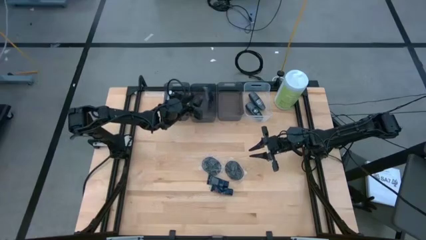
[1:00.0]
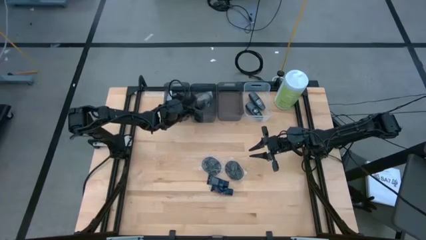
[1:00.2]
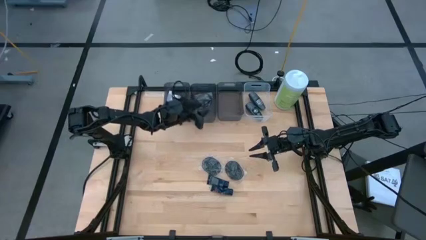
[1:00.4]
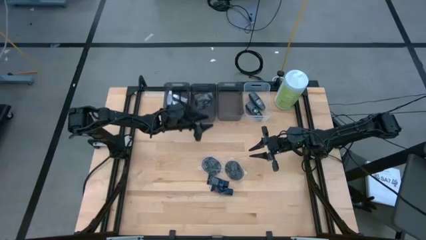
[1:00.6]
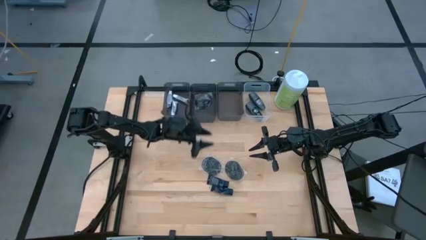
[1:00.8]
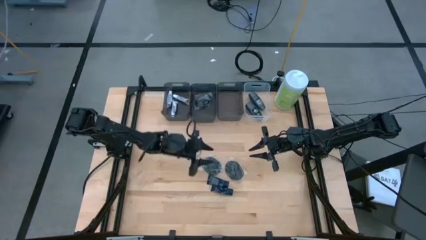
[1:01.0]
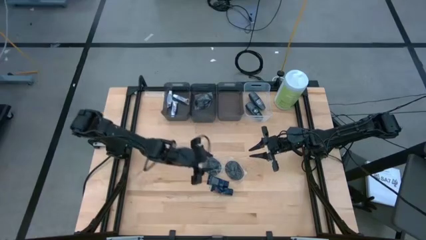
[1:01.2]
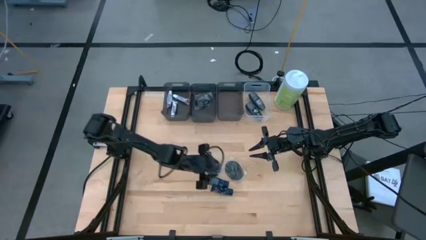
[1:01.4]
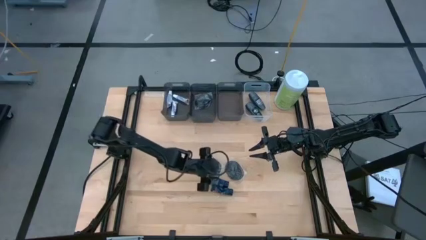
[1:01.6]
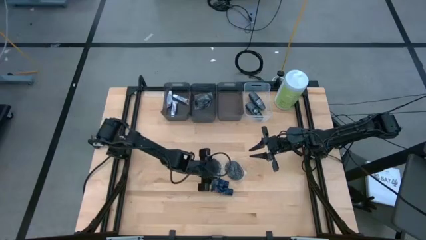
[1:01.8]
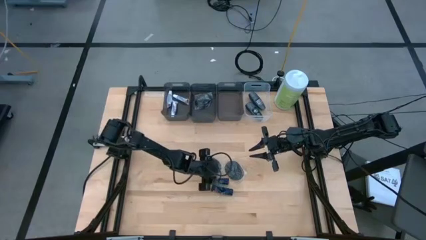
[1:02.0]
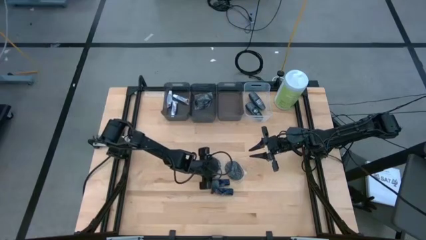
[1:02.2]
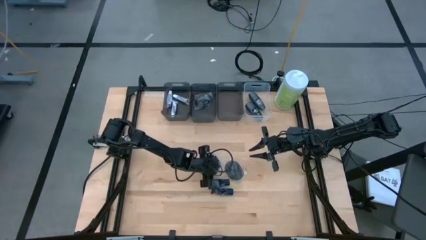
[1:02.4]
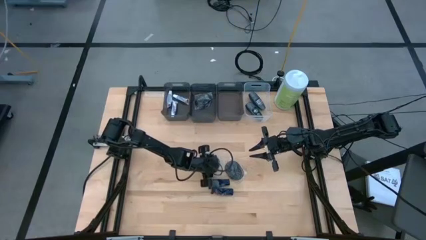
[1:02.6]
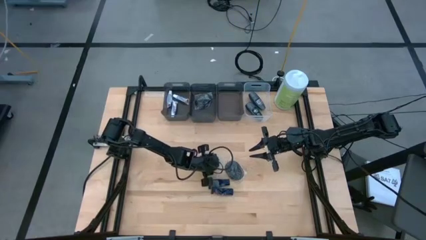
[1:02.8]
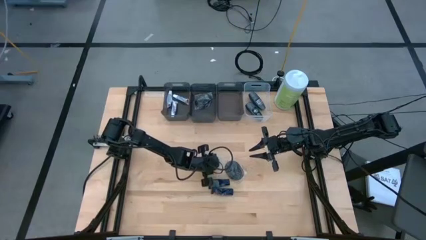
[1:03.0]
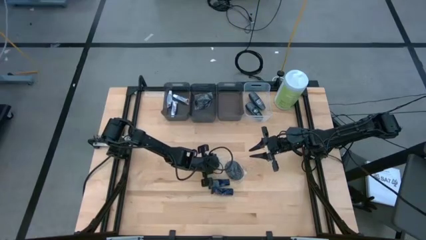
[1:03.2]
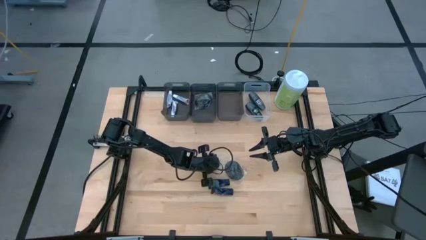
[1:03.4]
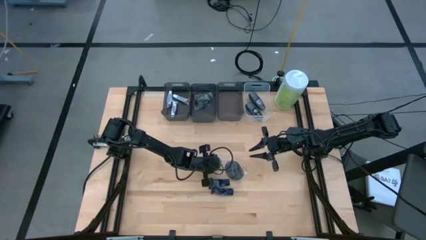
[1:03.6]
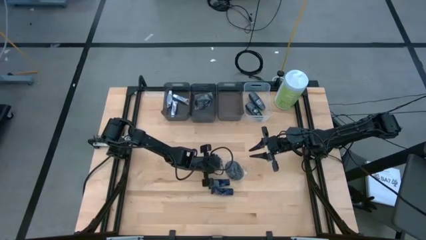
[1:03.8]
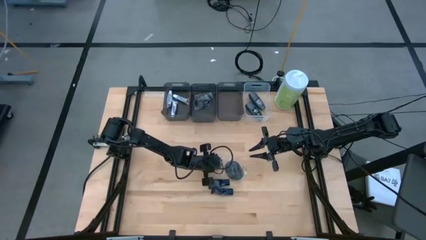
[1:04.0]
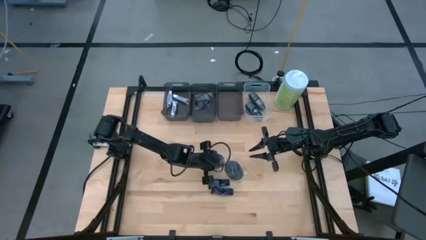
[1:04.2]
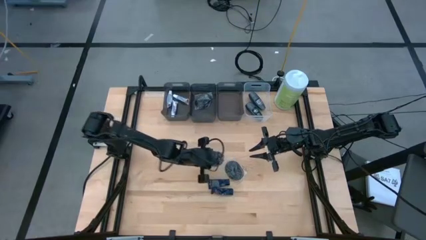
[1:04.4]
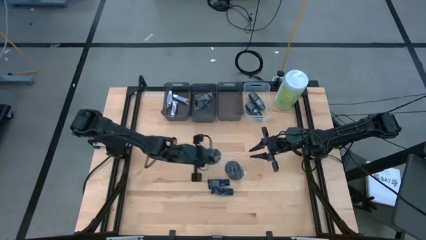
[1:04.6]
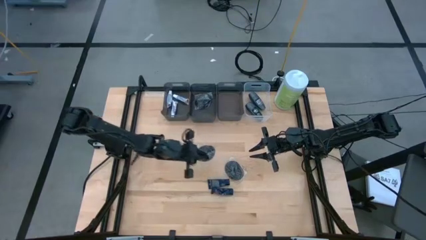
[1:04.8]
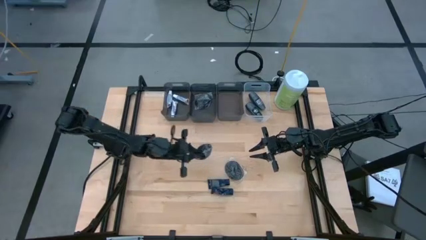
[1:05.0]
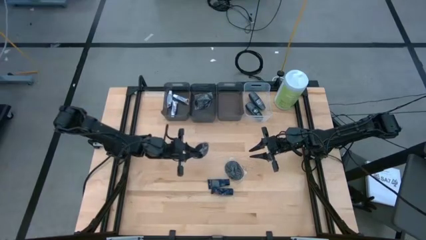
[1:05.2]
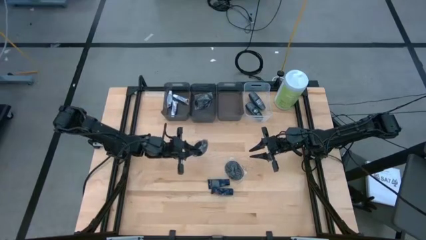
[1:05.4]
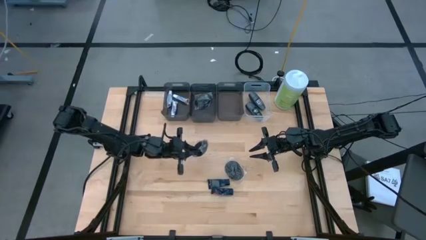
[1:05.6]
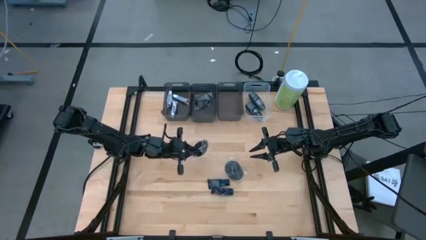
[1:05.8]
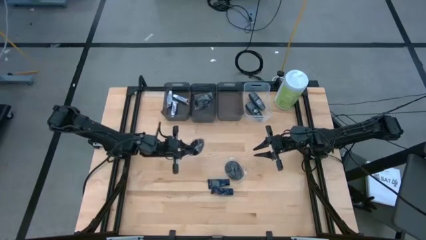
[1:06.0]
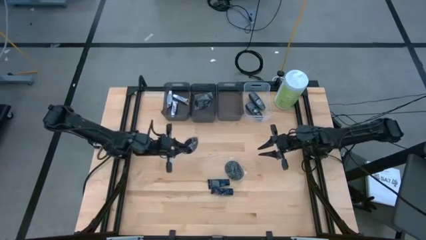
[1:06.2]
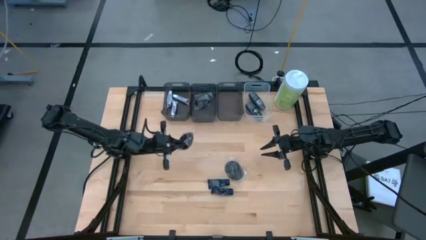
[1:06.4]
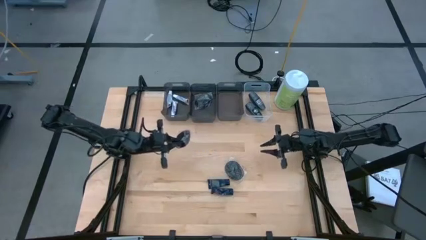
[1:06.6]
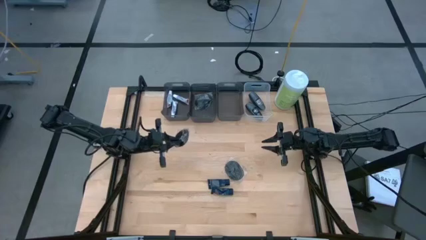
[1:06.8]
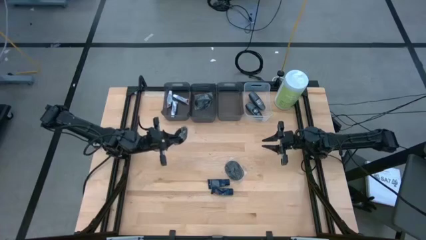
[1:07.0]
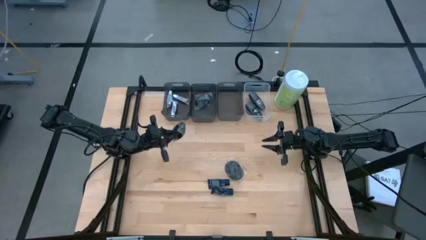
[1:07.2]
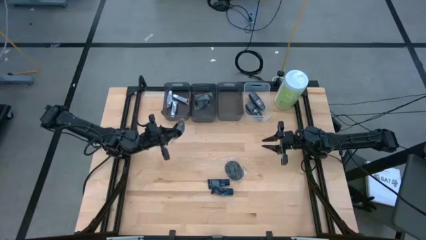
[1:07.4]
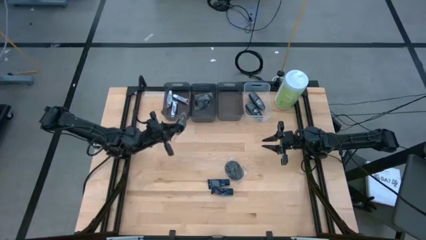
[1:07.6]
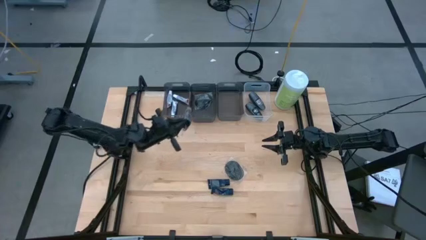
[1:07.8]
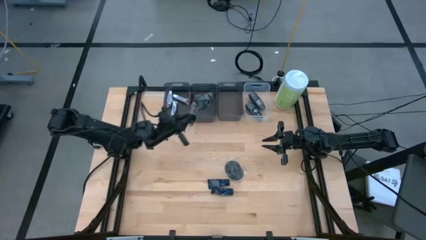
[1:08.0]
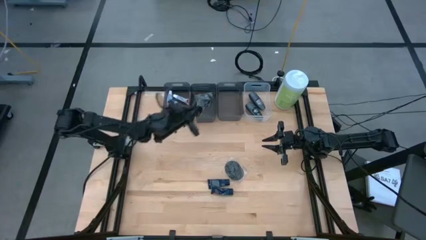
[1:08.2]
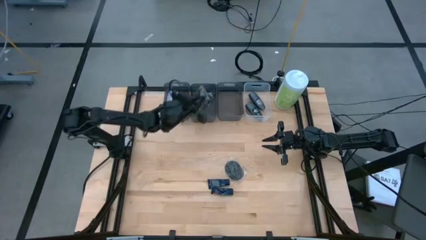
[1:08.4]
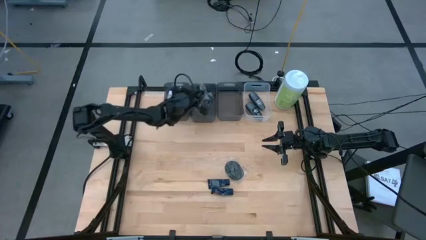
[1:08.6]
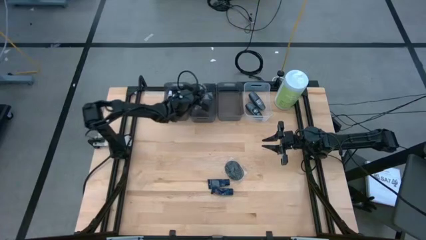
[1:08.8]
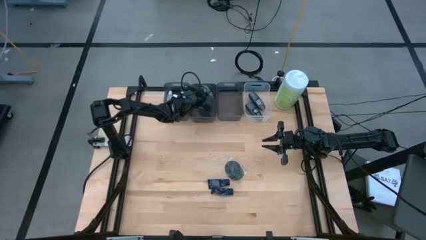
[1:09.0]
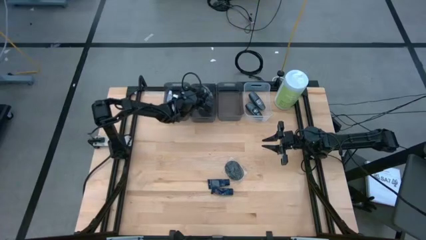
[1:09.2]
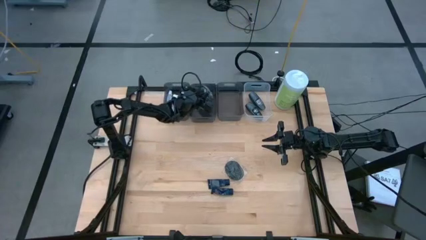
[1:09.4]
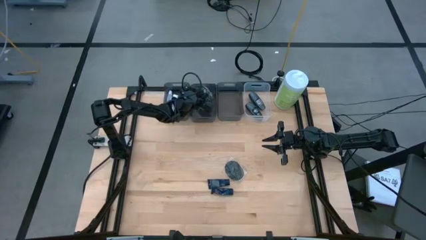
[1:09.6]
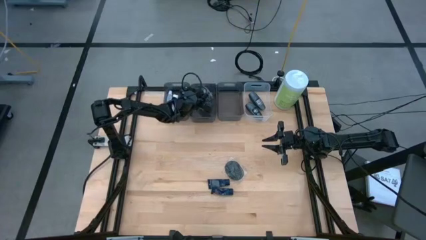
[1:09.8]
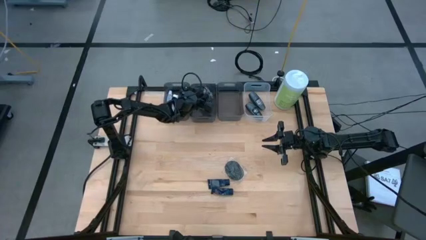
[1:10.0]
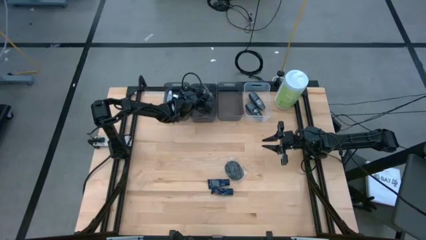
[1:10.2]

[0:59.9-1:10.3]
Task: Pick & Place Travel size toiletries
Put the left hairbrush into the middle black bin

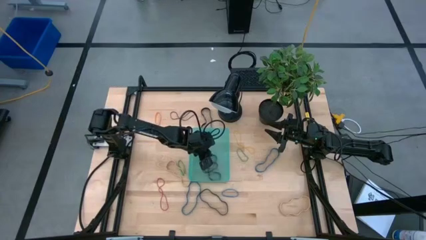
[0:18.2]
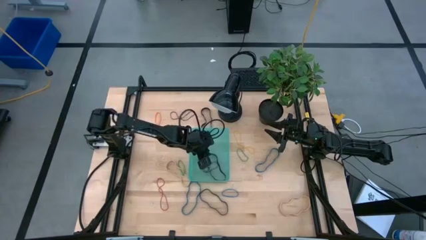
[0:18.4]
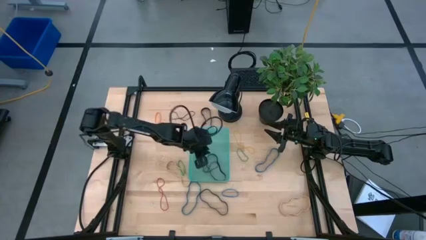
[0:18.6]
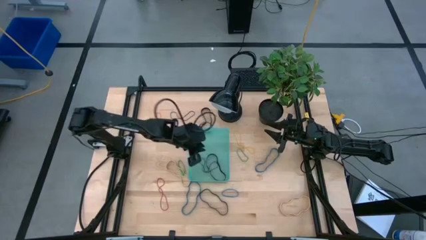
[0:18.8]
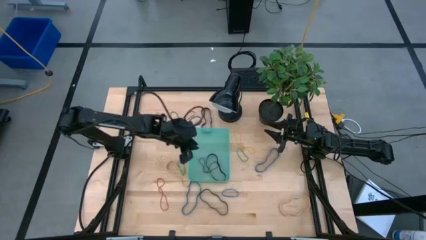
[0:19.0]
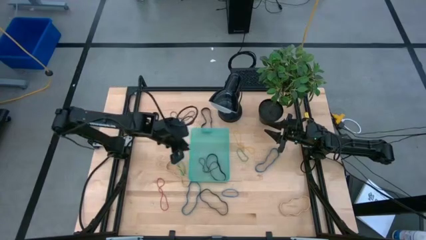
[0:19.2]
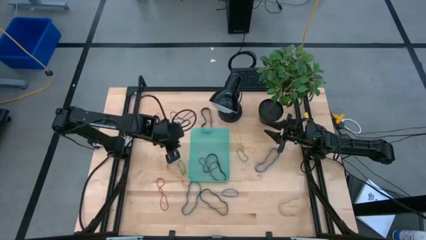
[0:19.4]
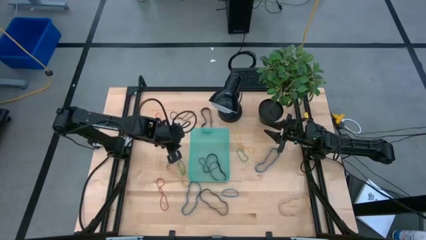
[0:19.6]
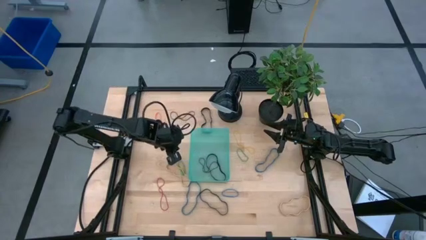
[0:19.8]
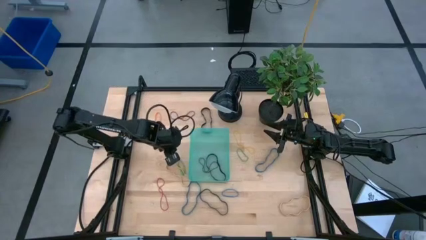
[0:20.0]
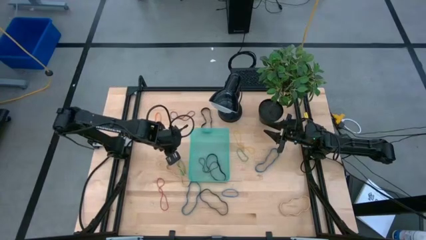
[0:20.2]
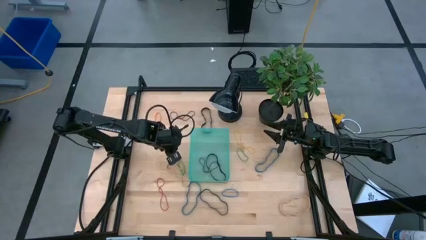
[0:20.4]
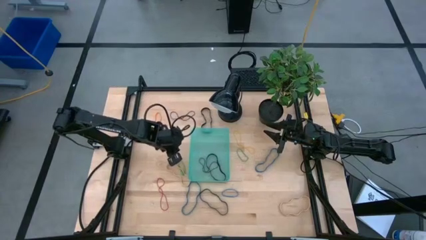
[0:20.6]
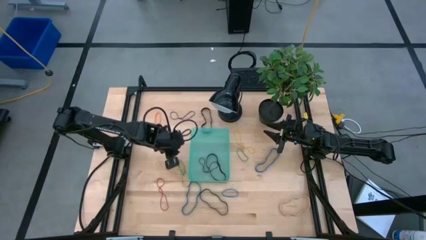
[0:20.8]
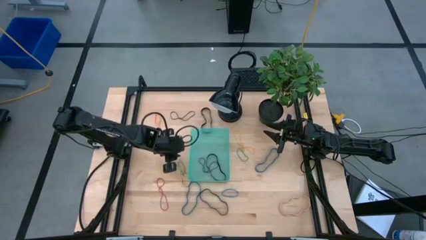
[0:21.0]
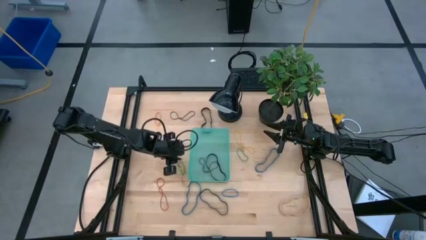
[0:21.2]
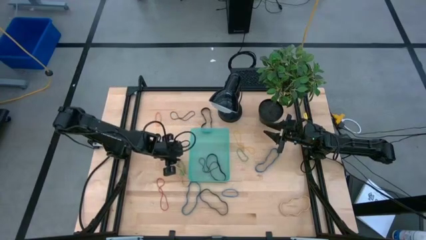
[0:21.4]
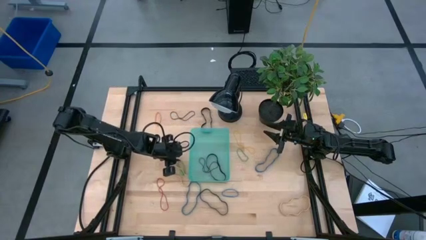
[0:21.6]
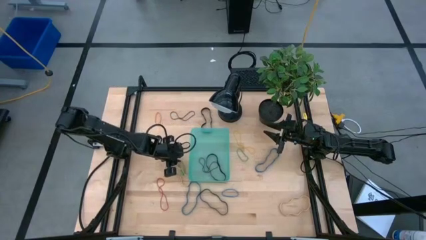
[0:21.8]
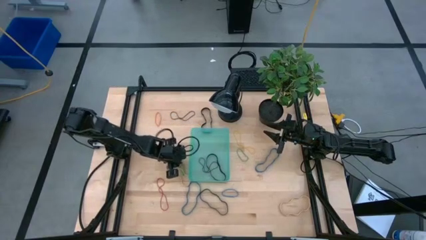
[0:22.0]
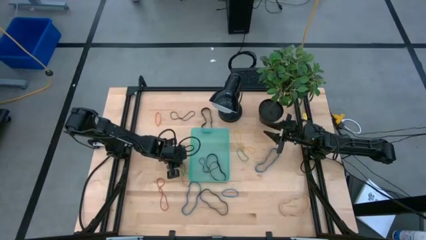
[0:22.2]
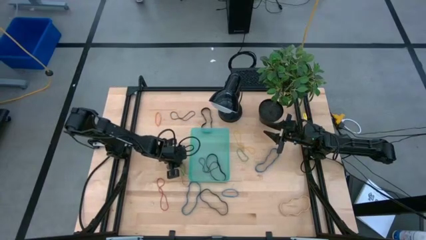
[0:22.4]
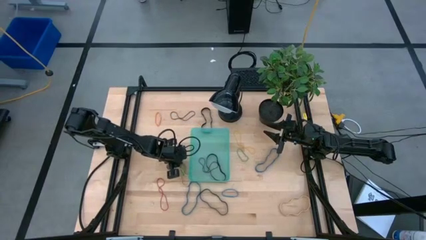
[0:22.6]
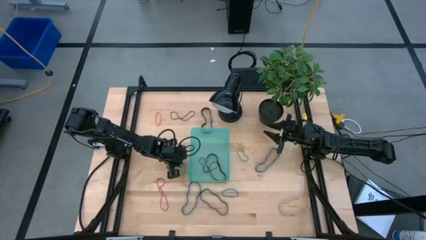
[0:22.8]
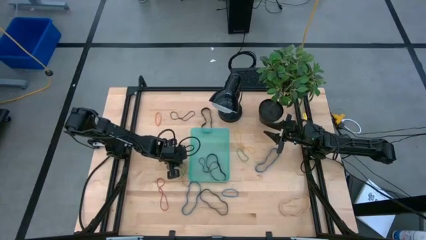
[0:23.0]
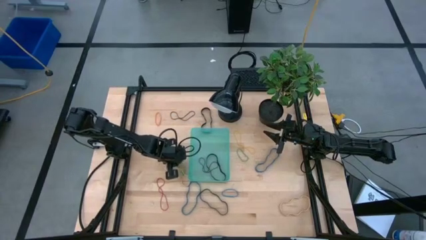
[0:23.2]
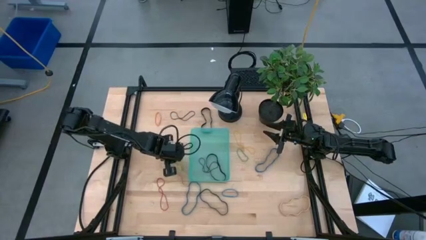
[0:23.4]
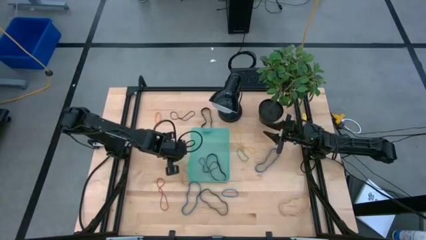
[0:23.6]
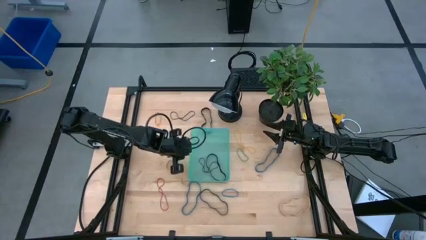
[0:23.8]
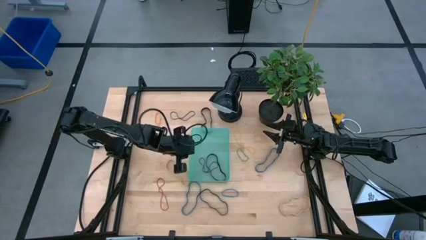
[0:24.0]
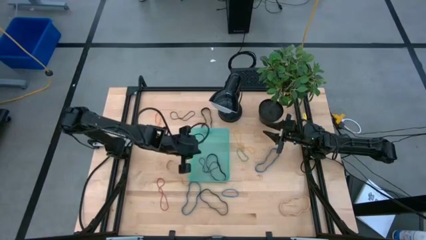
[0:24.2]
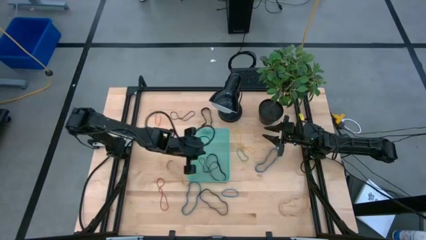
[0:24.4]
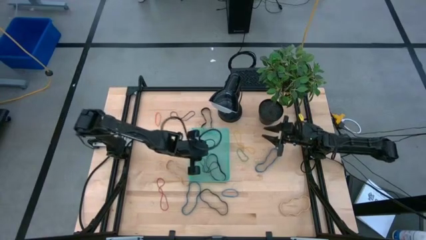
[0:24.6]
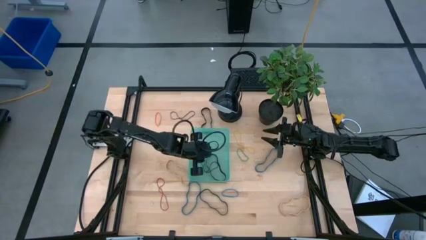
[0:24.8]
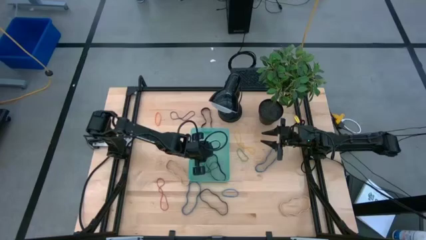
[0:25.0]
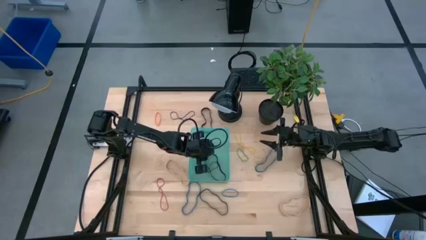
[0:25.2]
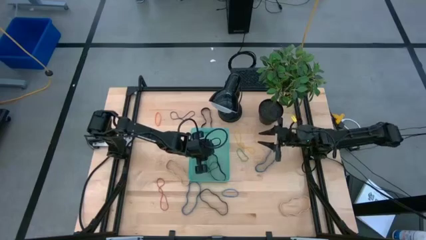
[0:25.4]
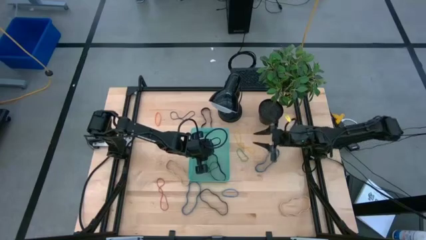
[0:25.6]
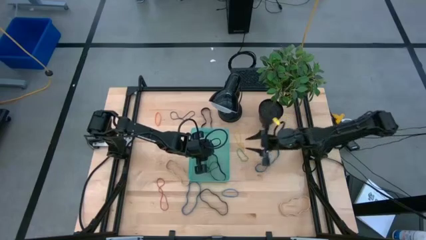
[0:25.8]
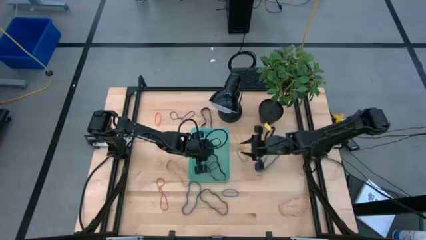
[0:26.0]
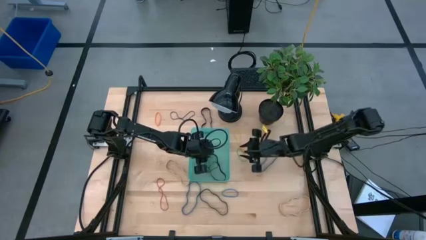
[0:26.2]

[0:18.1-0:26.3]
Task: Pick and place rubber bands into bin
Put the left green rubber band into the basket
